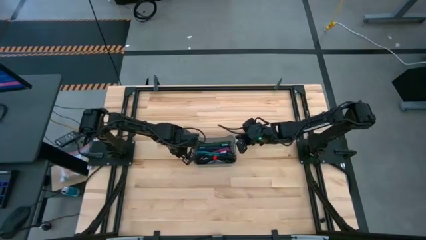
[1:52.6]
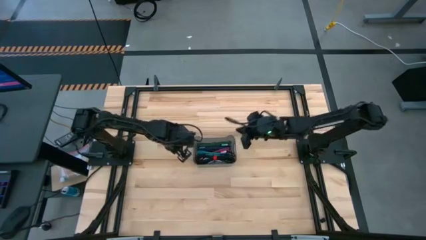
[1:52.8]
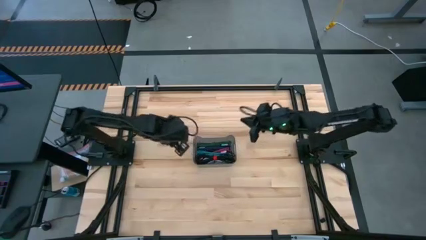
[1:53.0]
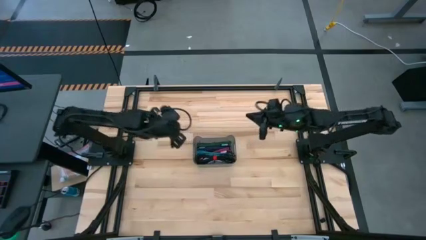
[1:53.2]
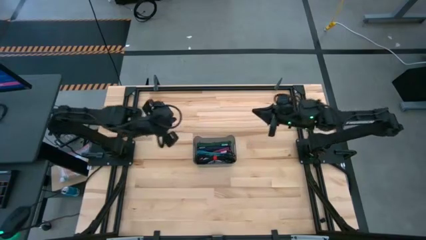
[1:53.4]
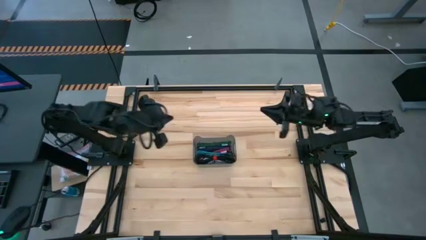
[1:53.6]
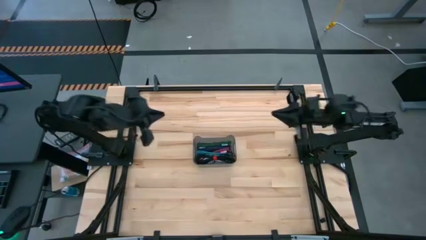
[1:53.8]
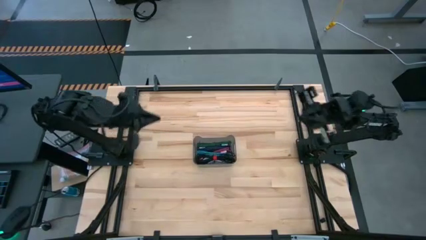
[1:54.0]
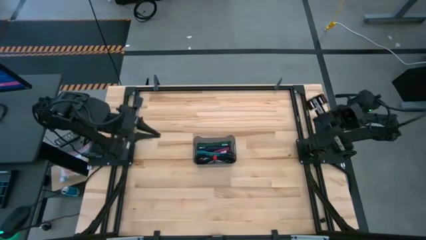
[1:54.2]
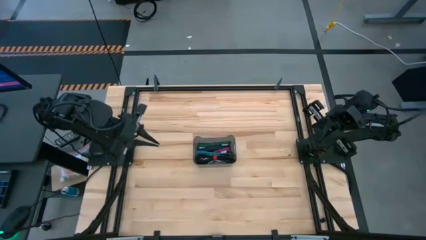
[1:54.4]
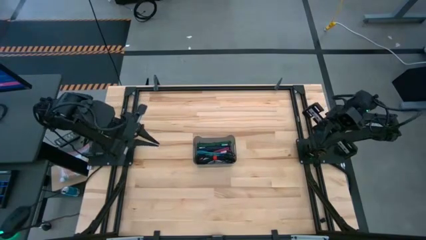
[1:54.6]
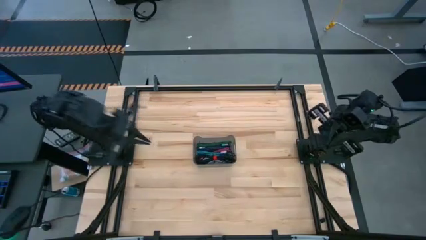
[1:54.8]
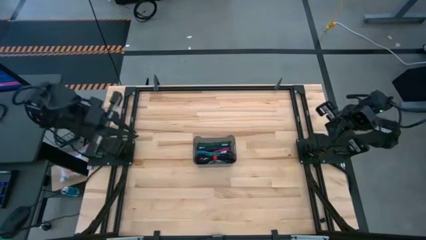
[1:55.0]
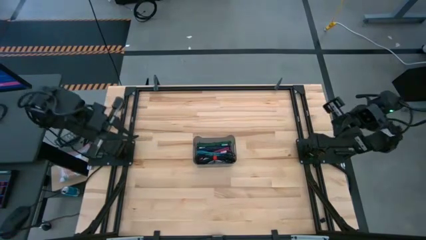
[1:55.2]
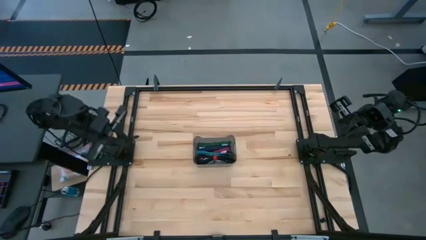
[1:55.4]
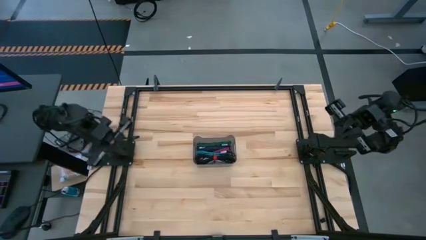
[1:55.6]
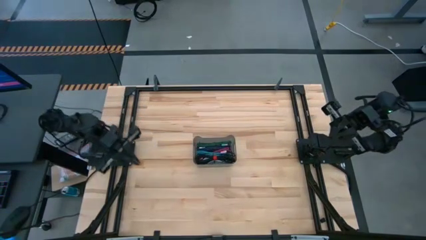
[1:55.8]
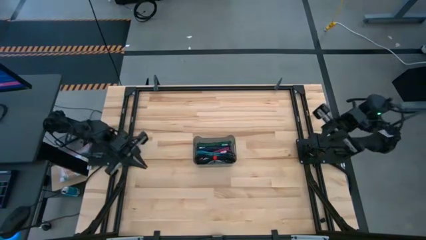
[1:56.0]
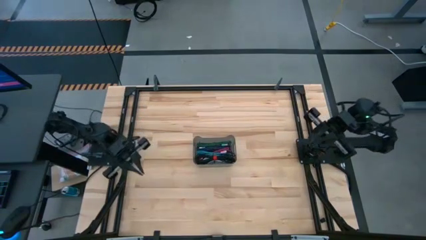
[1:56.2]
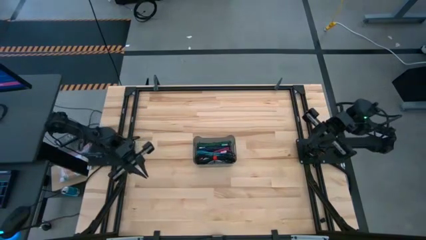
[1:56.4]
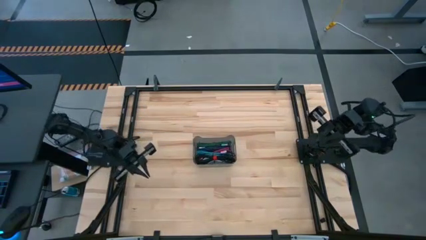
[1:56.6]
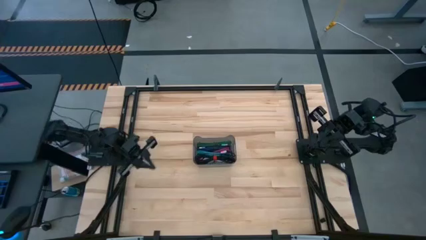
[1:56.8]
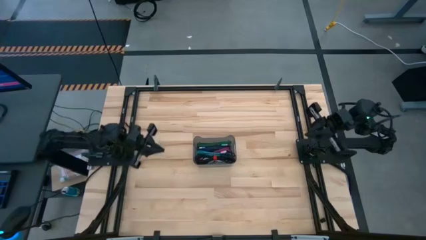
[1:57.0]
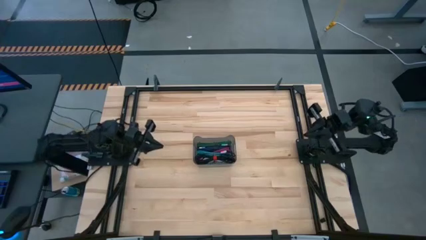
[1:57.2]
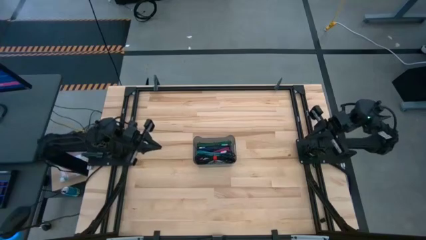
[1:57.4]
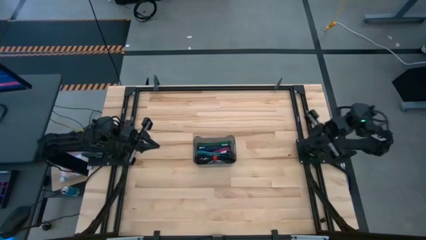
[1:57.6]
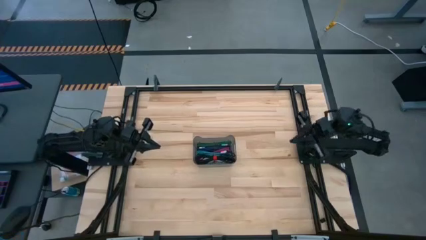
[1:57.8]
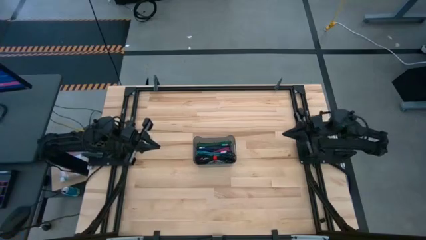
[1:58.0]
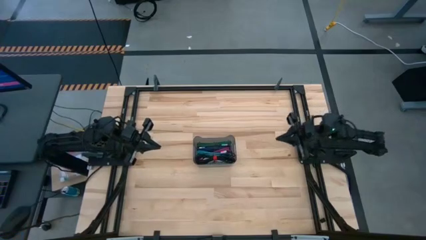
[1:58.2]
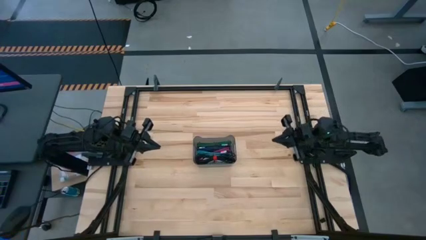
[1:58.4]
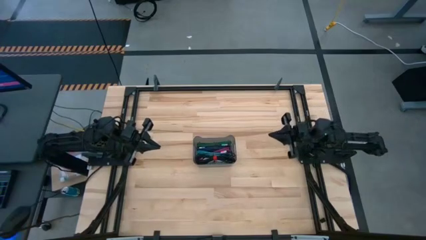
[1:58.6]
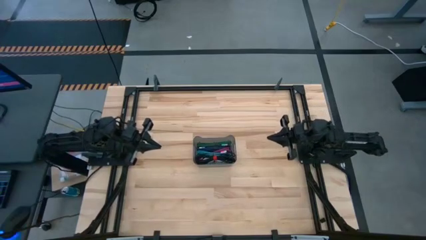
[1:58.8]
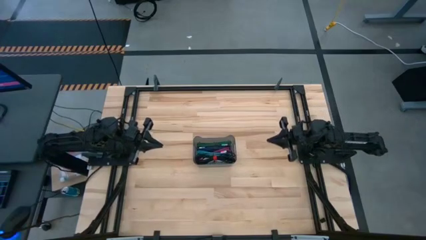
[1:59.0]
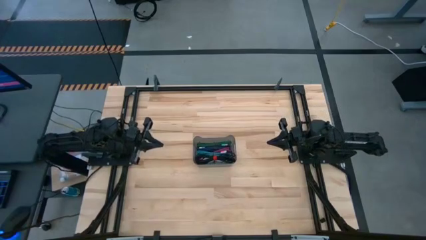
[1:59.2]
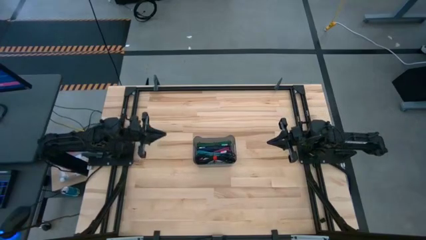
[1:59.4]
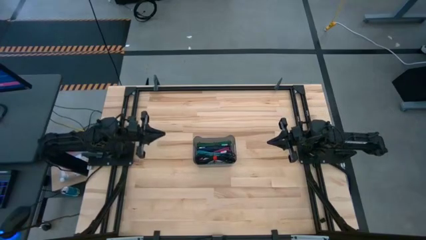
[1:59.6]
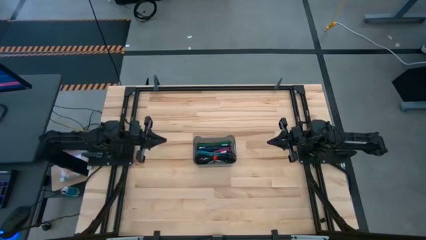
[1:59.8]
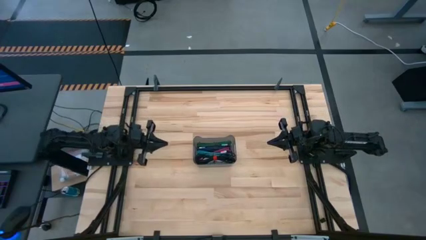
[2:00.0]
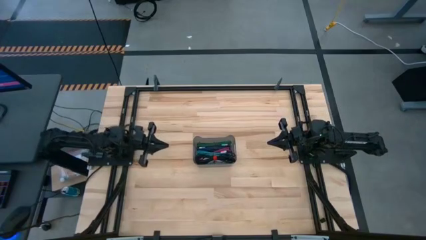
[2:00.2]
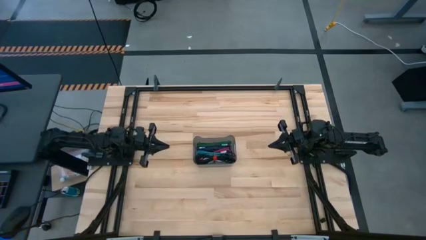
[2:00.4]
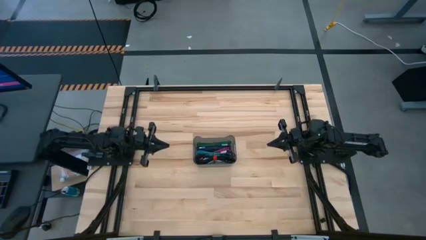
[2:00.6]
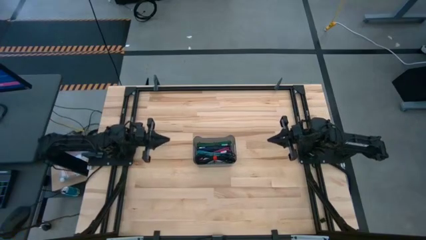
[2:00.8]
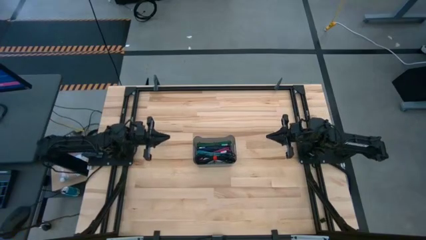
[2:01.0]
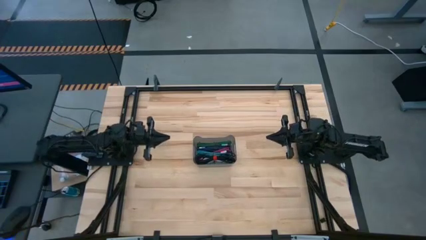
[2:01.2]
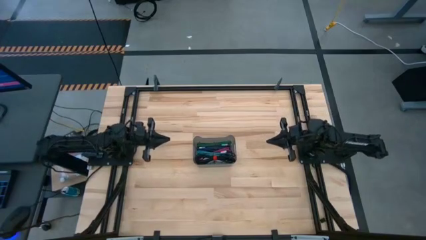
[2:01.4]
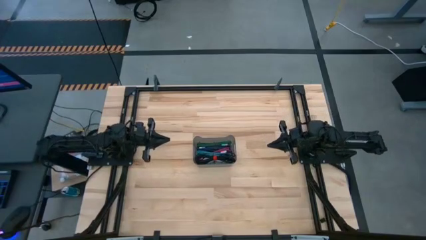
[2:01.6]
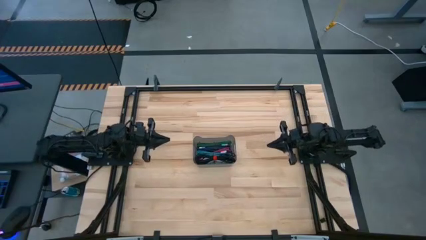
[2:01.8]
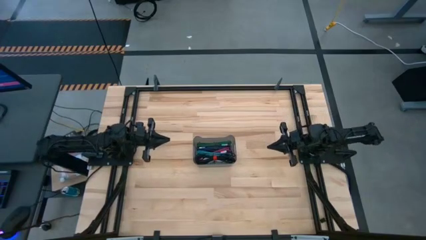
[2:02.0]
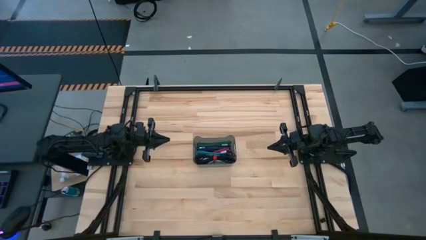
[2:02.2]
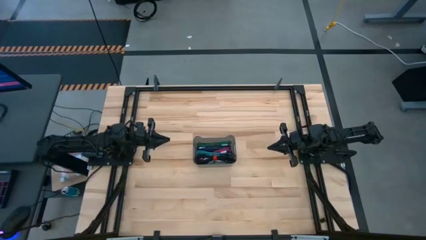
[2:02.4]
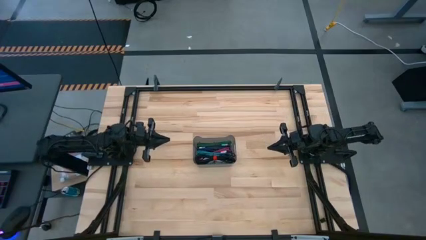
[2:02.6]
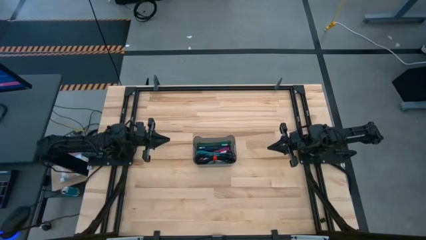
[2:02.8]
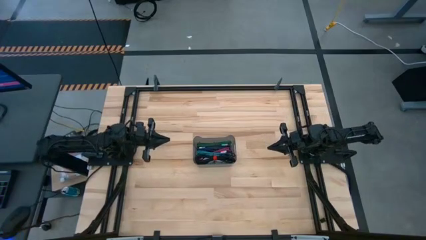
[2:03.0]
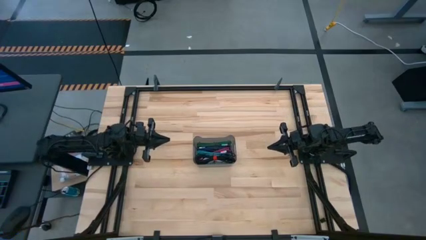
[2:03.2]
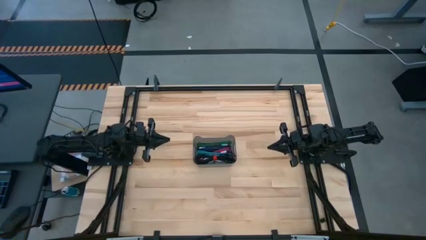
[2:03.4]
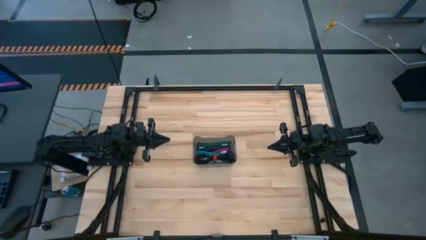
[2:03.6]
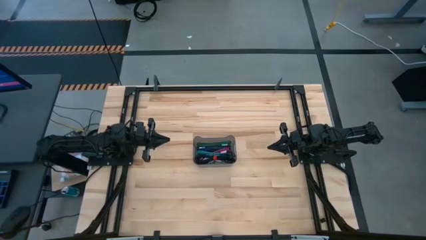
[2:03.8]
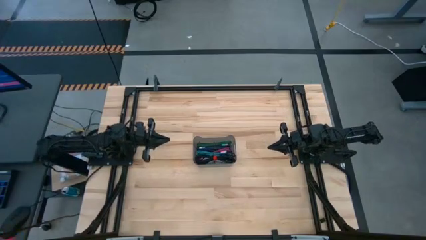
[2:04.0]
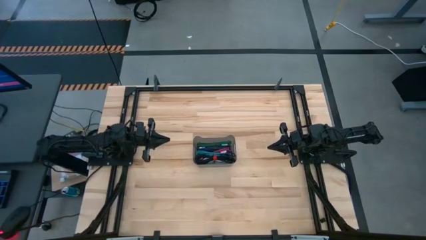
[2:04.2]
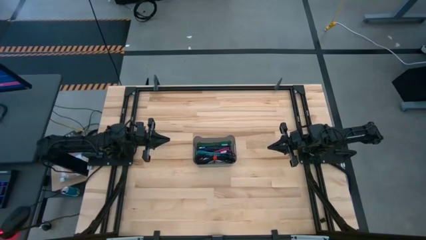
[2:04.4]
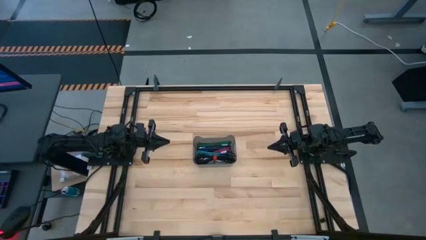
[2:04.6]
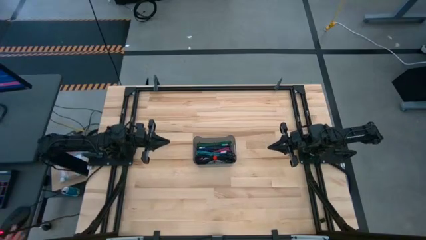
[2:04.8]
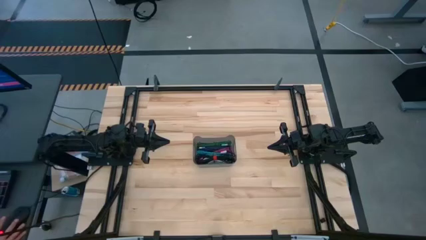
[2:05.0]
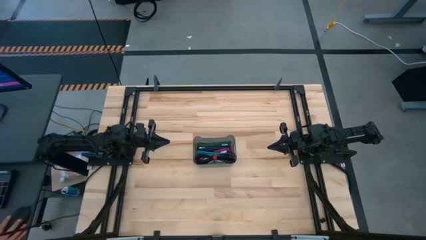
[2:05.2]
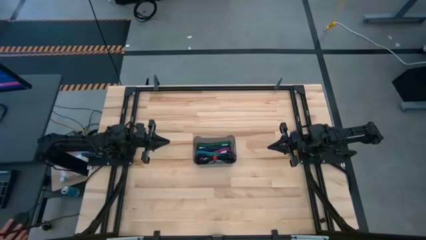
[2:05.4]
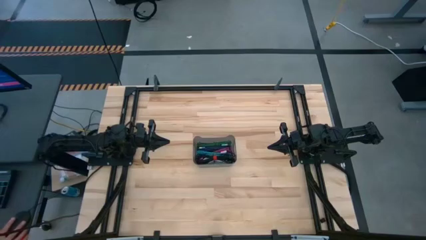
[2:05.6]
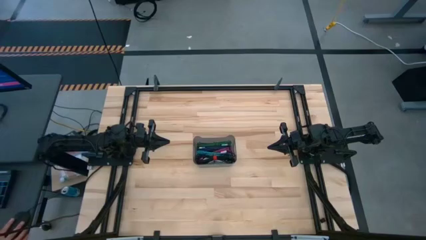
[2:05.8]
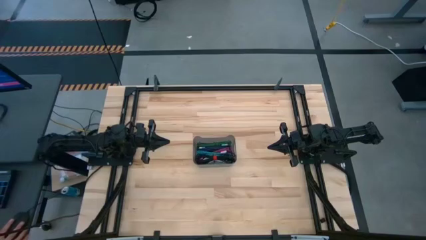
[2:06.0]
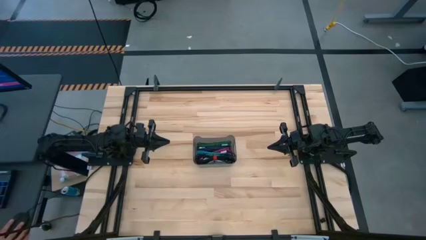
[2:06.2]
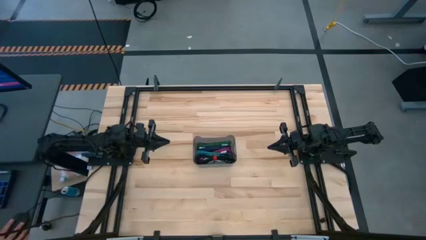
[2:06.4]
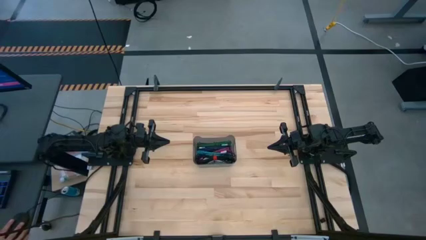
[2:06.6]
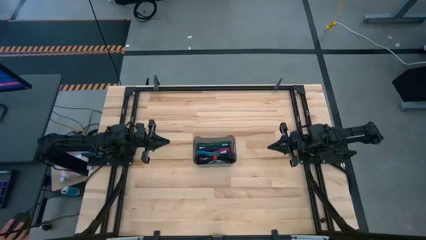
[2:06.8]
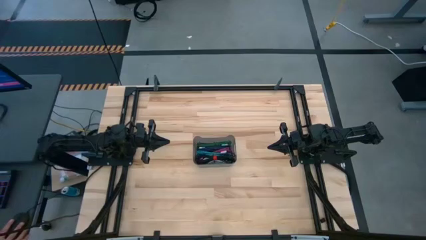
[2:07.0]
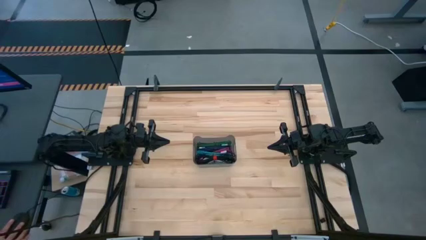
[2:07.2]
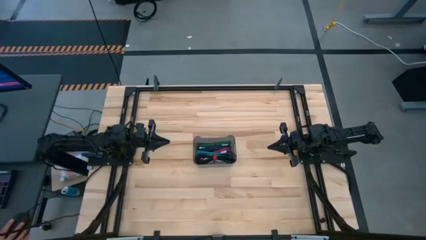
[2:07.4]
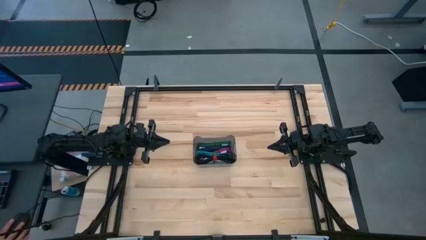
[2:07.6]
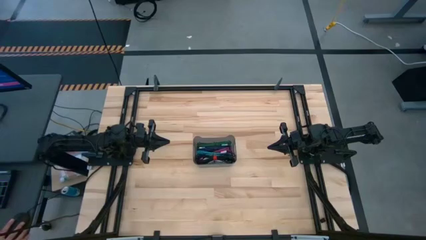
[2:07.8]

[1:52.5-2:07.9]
Task: Pick and place USB-C Cables
Return to Home Position

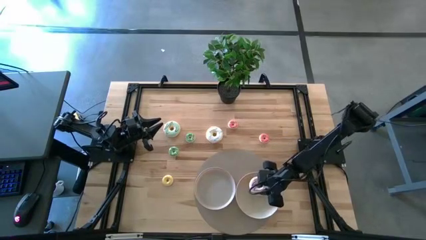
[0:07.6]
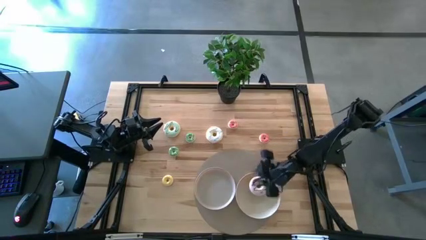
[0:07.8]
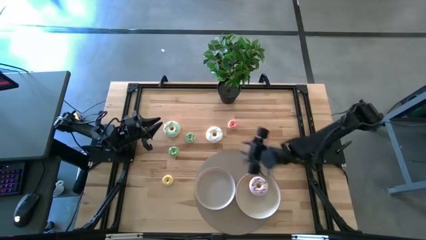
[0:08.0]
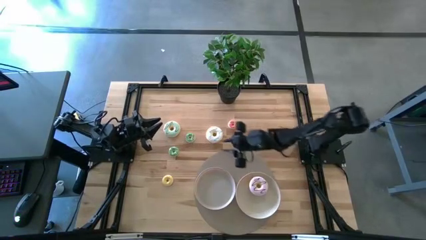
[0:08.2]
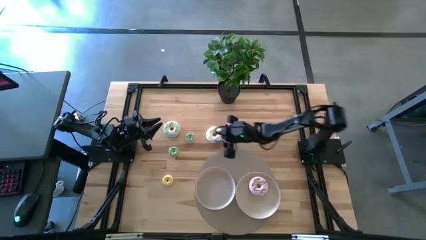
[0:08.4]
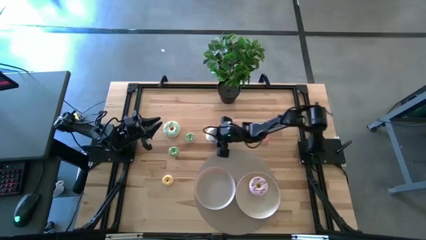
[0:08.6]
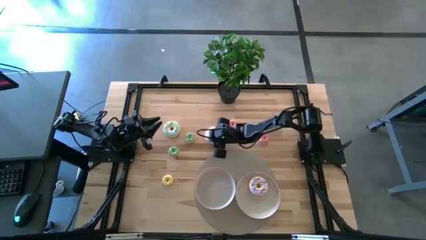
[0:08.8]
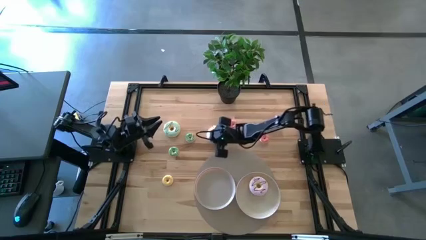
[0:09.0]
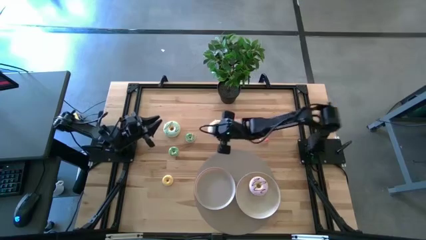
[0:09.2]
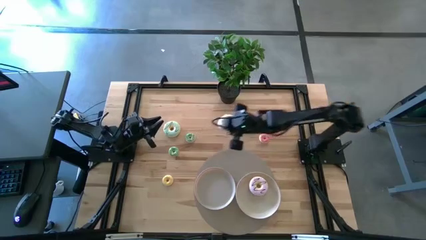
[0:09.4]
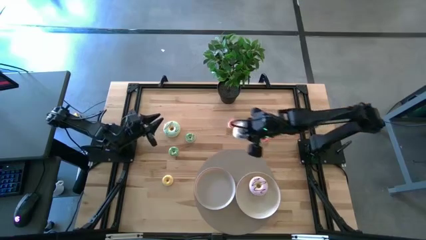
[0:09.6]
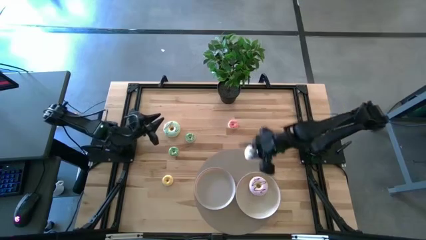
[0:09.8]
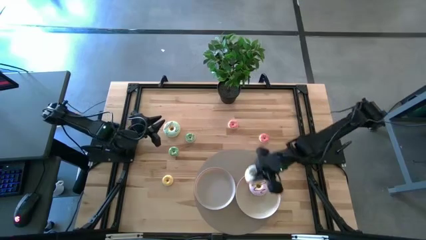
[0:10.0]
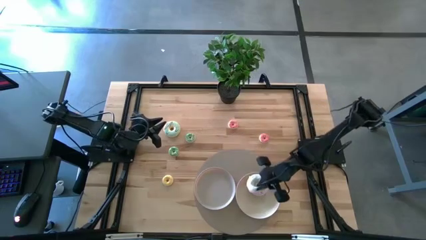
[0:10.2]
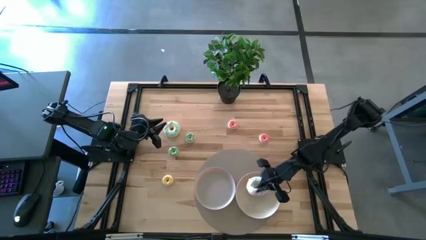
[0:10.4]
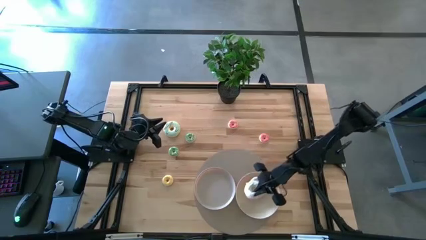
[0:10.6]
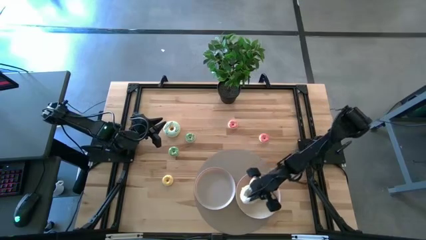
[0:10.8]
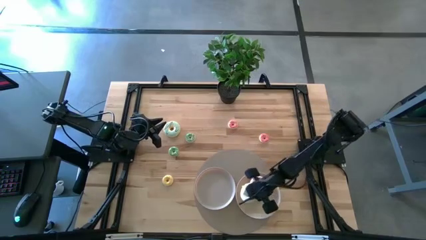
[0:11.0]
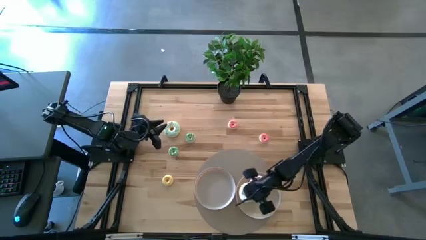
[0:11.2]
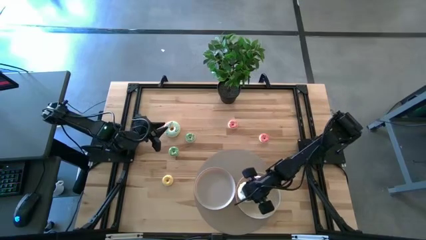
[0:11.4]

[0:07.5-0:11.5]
Task: Pick & Place donuts
Put the big white donut into the right grey plate
